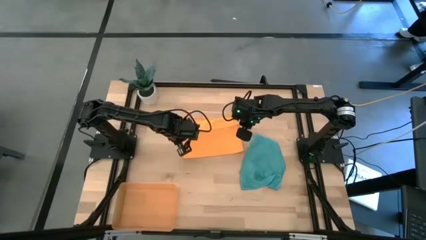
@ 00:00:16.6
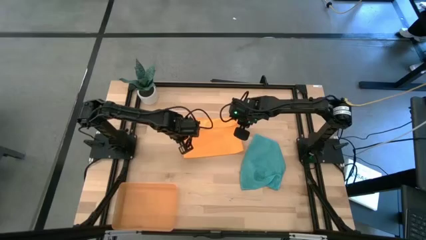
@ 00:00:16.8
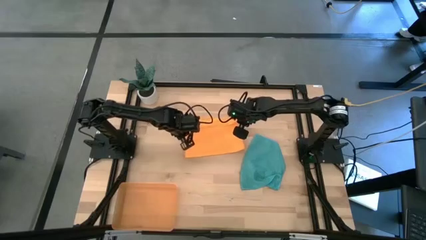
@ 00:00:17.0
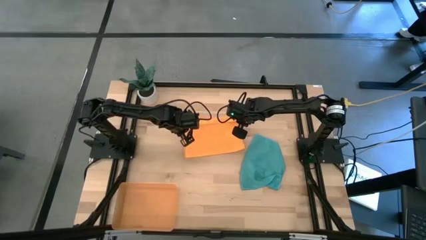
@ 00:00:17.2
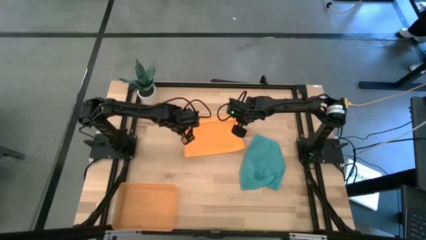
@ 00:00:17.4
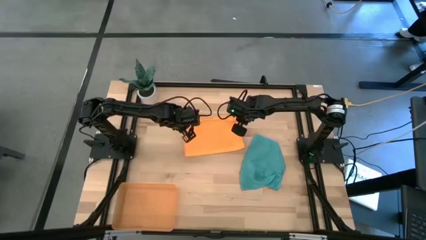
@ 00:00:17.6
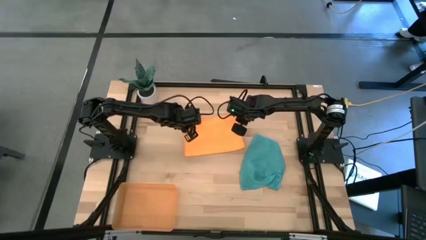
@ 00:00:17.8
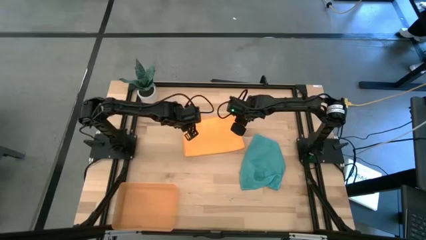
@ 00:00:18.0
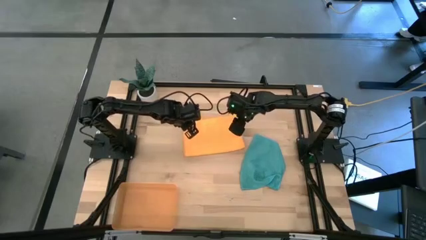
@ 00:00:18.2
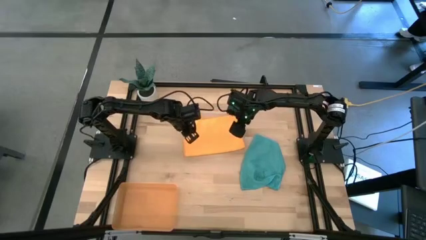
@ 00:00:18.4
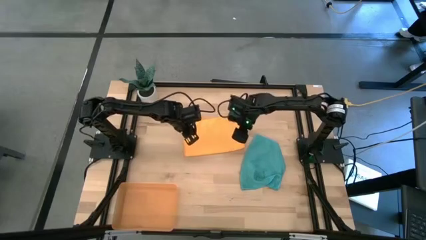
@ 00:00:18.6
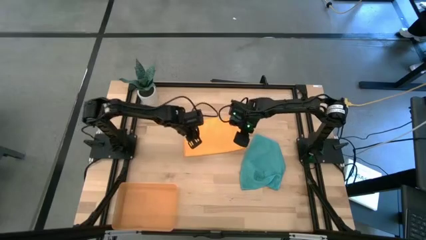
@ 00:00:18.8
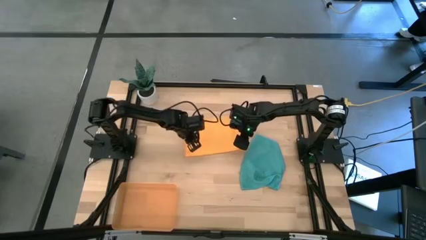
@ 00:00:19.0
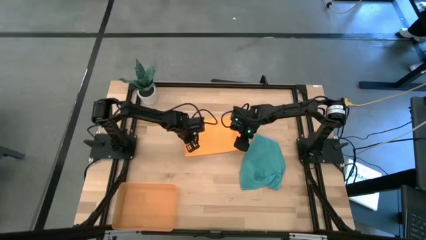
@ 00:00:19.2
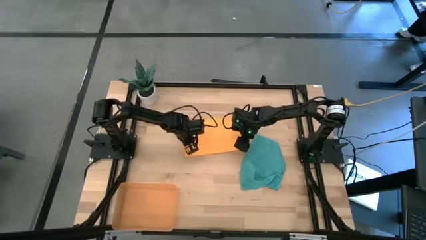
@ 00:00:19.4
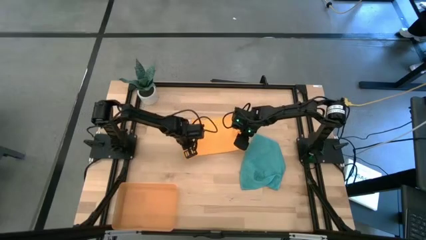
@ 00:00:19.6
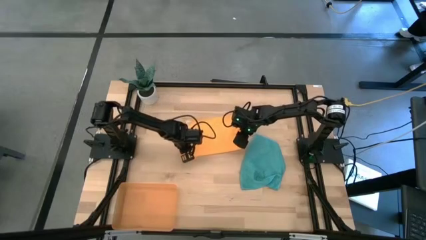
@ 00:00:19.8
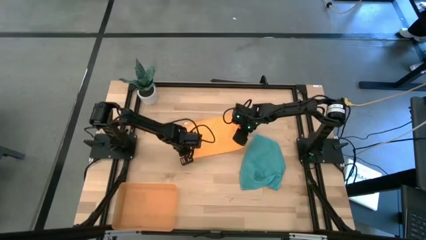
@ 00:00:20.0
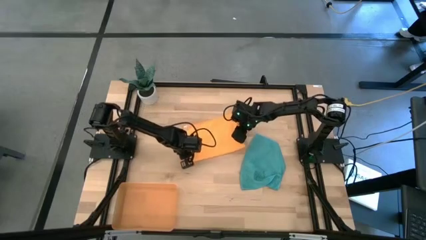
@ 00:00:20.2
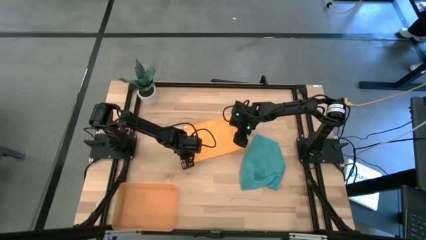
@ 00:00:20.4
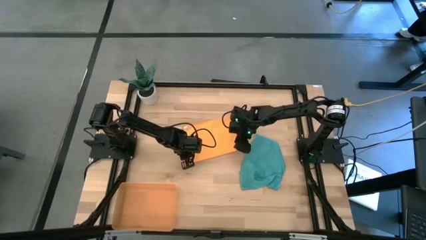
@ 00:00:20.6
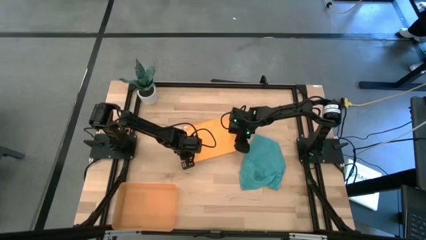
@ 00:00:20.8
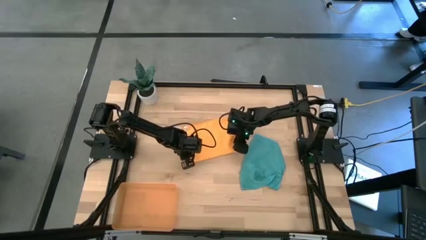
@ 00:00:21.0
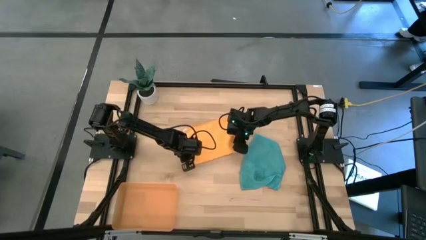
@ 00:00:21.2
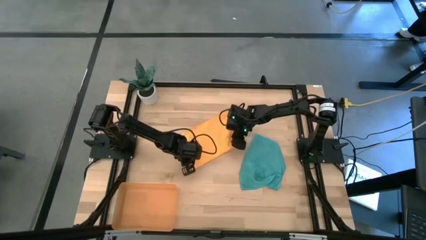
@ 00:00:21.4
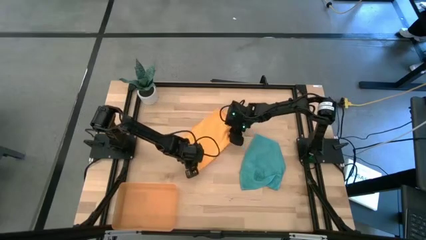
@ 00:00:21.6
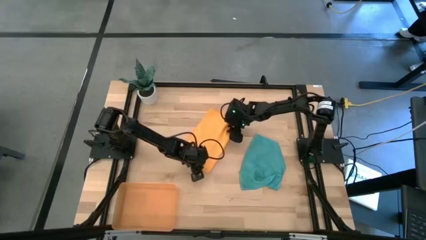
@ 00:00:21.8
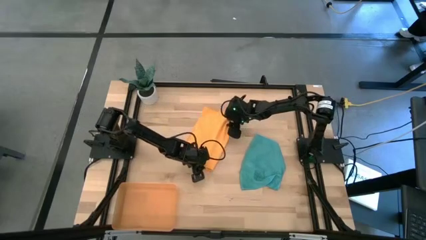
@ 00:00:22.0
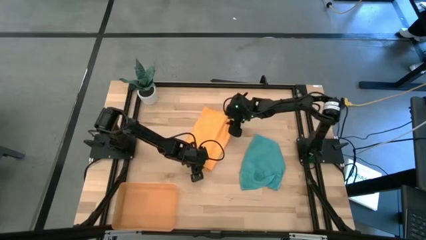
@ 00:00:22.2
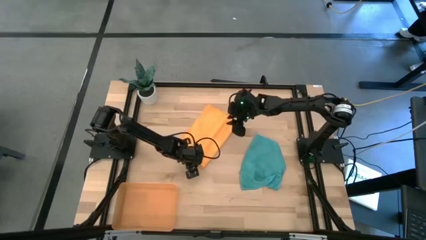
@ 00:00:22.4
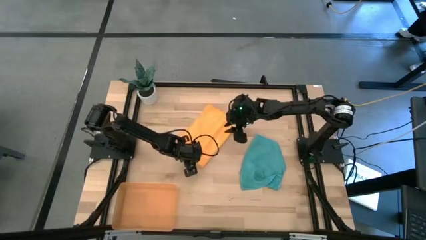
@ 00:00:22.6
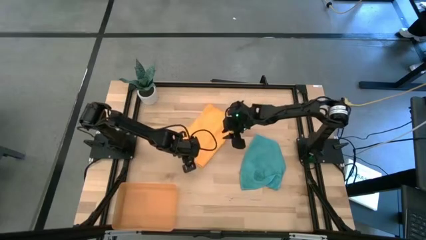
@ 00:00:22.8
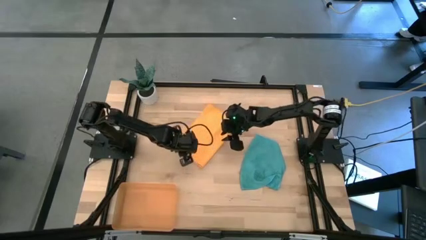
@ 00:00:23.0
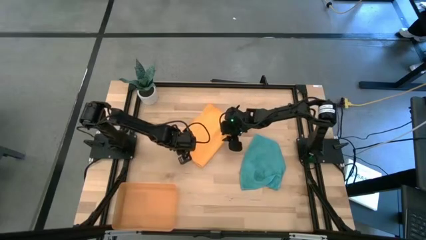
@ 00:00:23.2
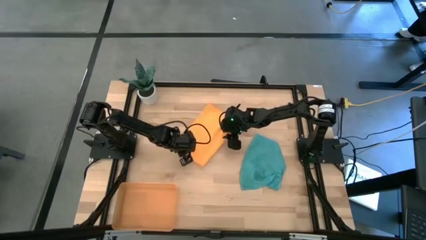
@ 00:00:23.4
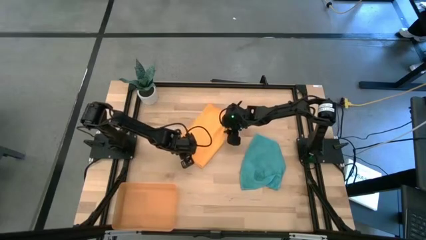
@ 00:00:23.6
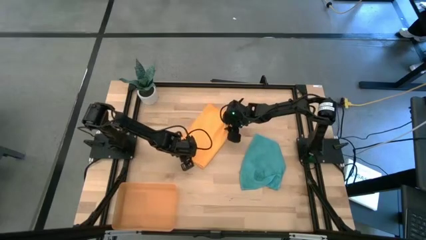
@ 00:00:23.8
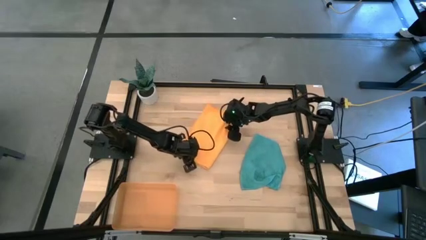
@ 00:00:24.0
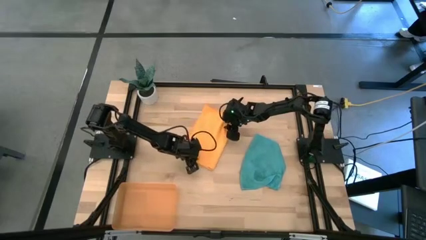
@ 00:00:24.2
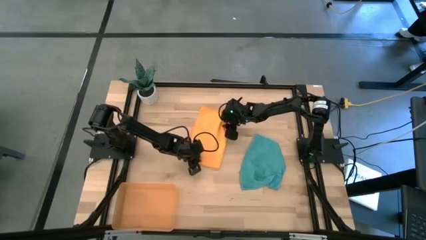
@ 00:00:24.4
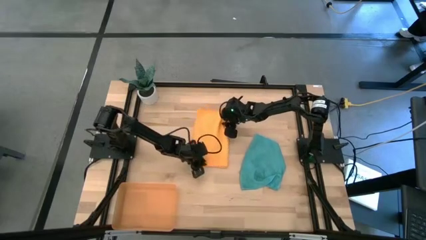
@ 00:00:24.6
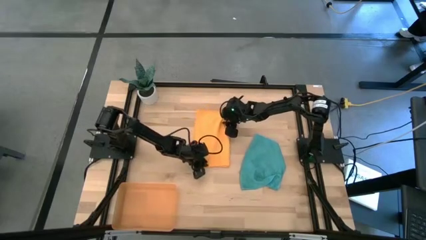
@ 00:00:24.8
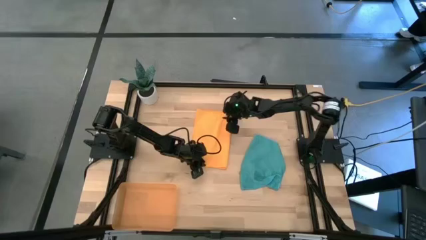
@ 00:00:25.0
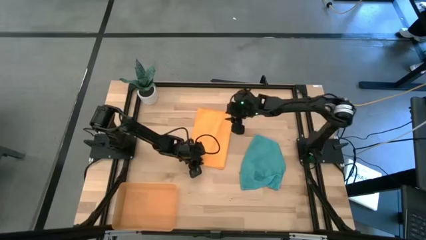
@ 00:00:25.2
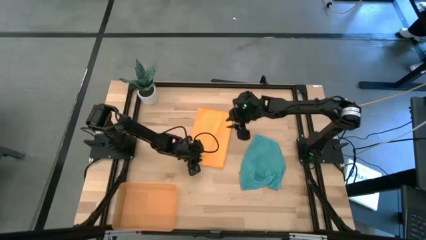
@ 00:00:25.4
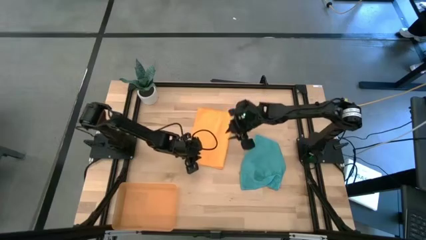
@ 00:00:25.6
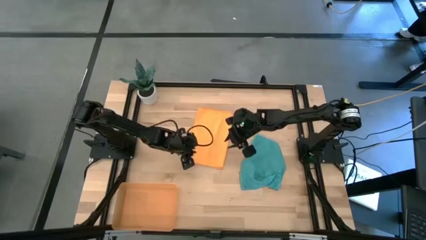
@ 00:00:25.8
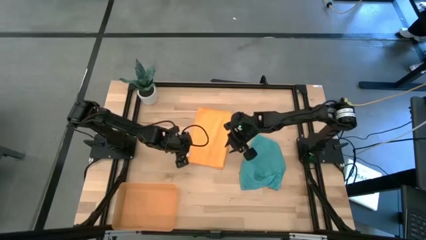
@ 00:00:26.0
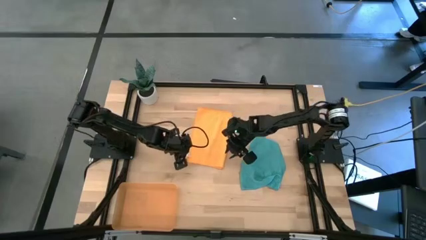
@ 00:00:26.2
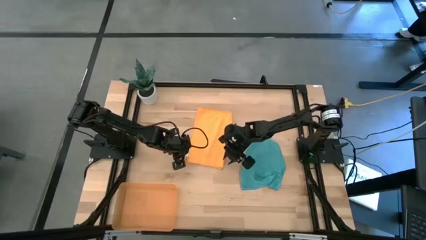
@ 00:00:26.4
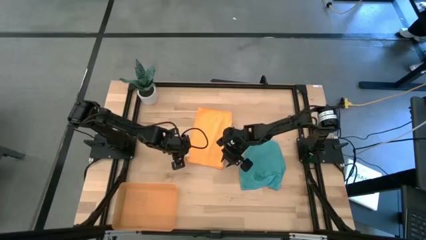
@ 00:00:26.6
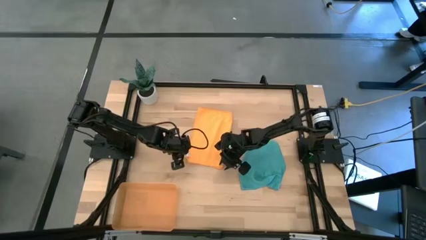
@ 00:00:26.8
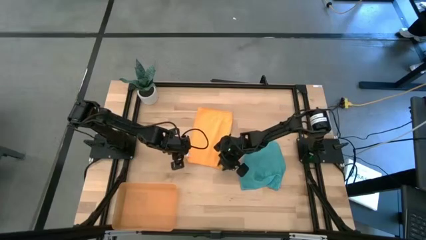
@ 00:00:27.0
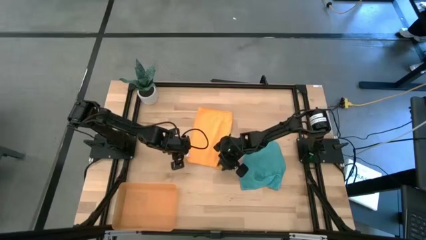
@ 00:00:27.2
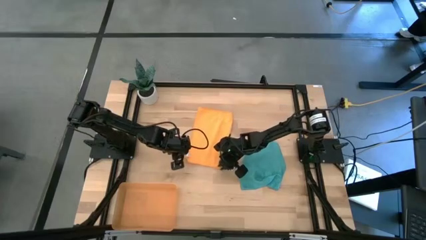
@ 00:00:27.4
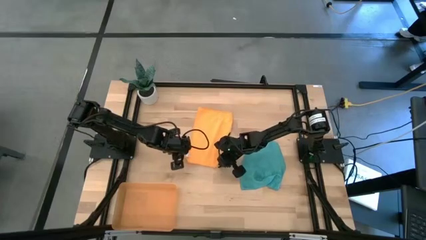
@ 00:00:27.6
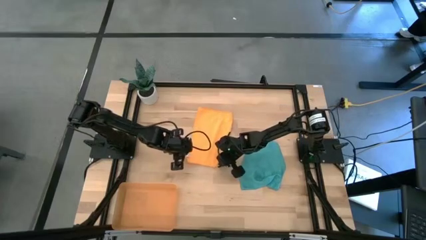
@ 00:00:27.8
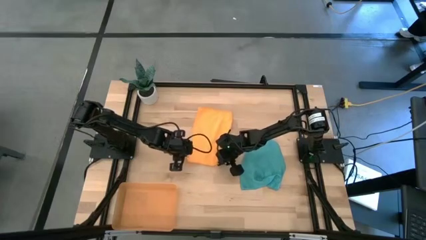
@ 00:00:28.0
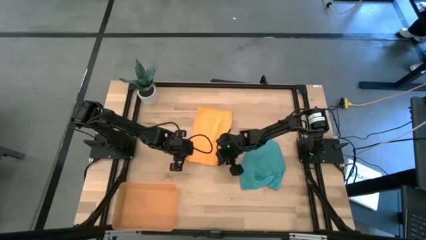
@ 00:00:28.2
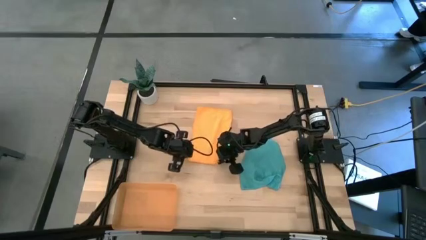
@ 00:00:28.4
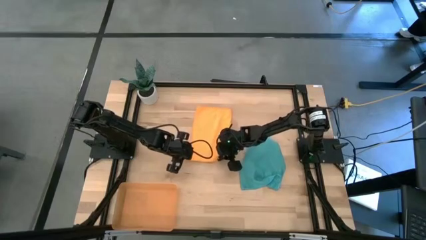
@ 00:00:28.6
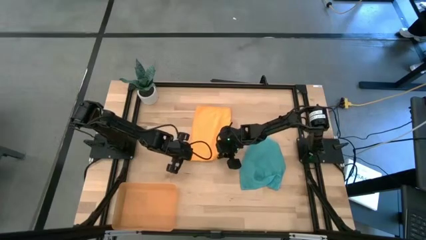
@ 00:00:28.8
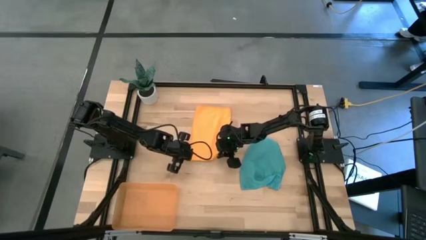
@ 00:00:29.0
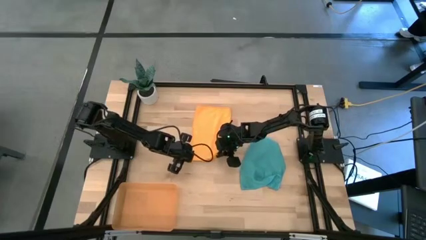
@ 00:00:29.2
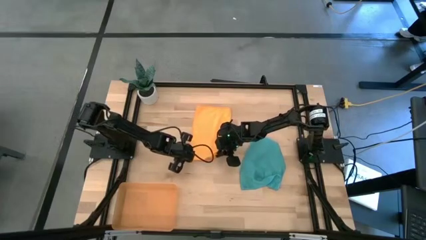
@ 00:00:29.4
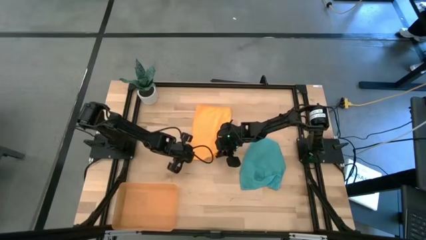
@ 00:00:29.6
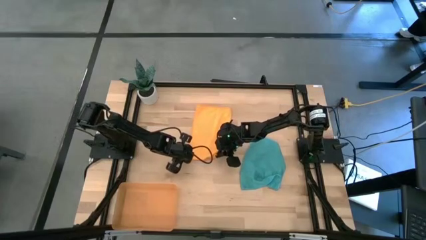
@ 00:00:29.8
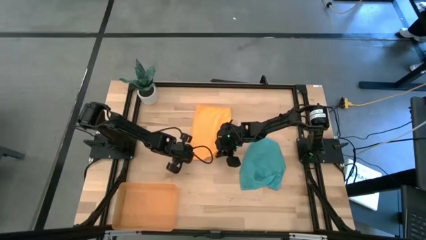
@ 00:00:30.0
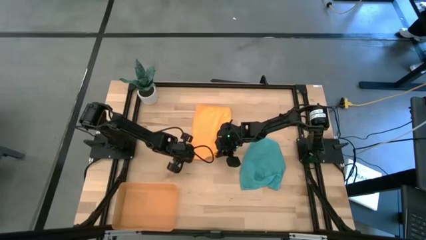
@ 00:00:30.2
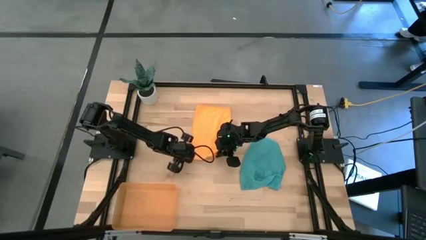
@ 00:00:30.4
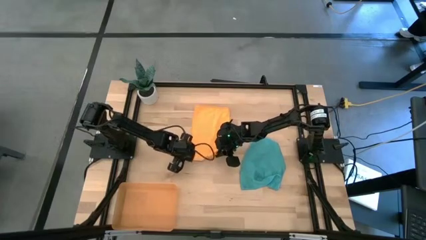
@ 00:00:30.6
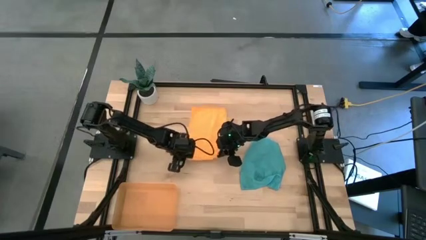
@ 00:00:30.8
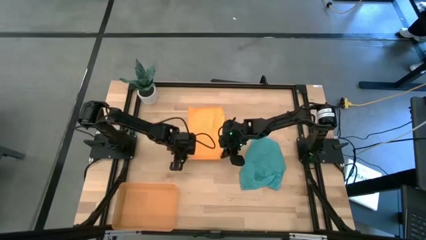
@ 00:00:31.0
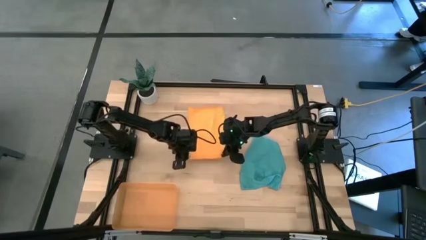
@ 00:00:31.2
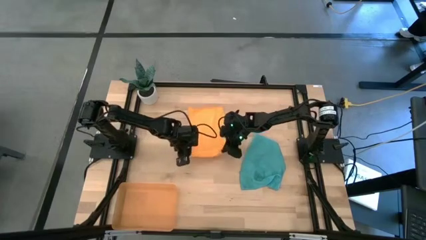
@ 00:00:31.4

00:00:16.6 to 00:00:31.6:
Task: Roll microfiber towels into tight, uniform cylinder then place into a basket
Roll the orange microfiber towel
